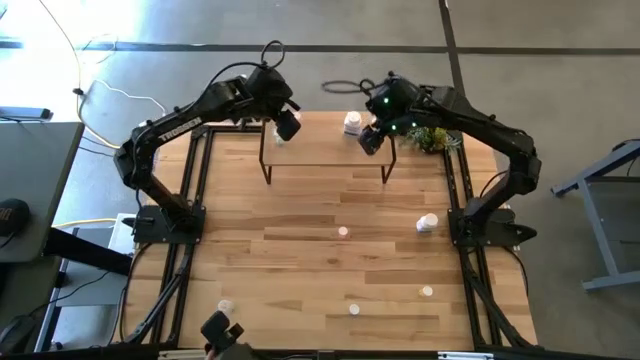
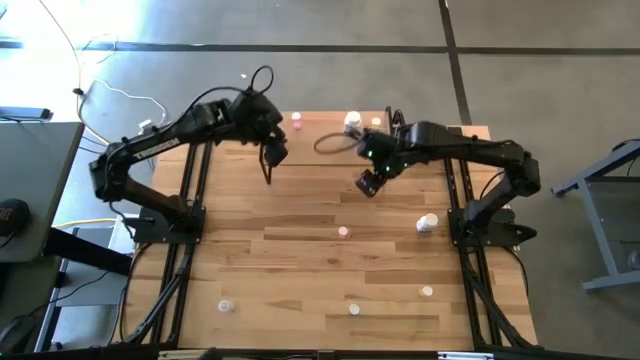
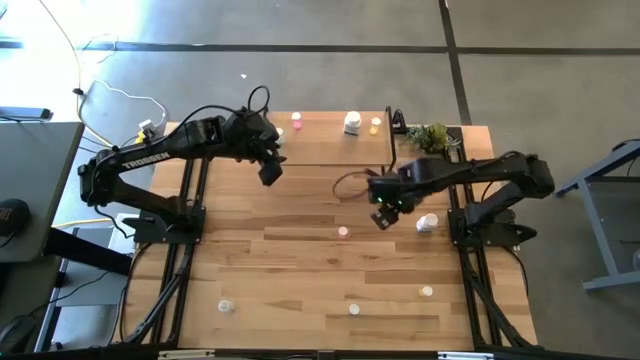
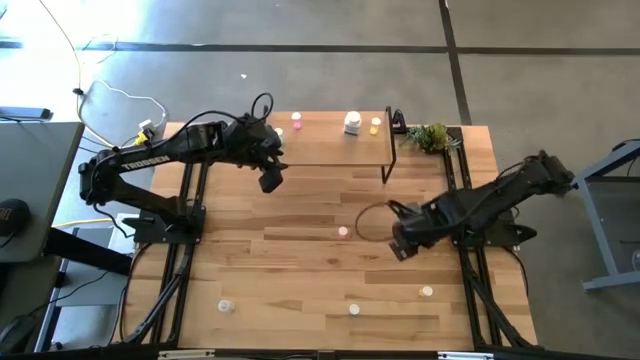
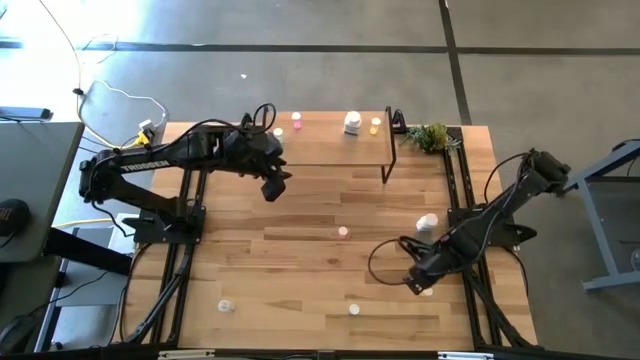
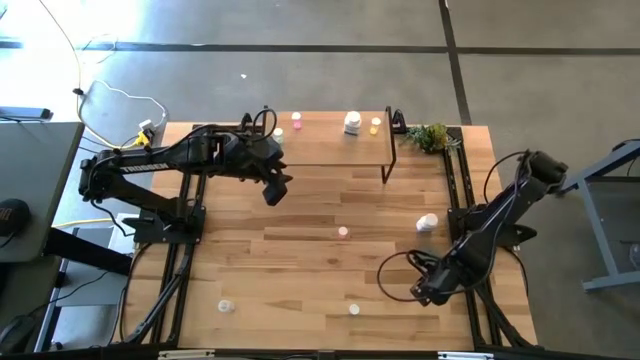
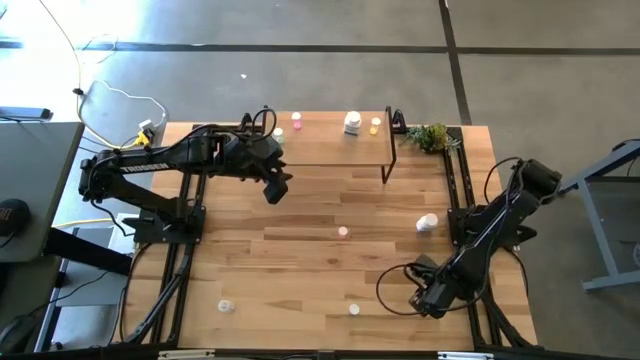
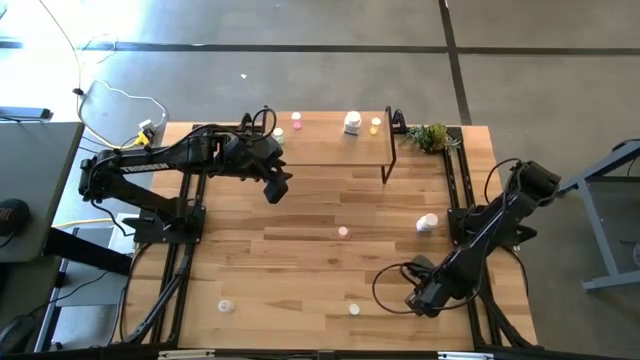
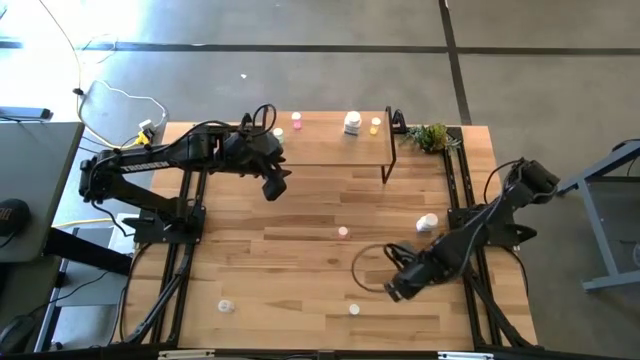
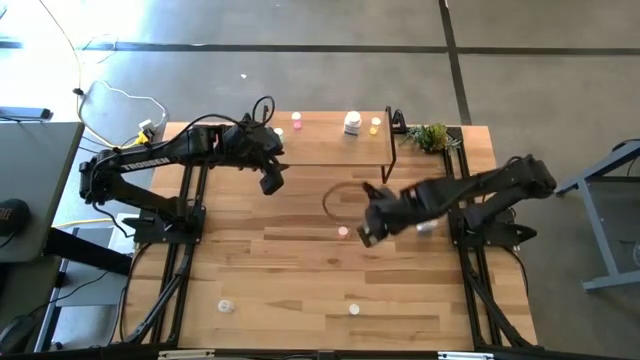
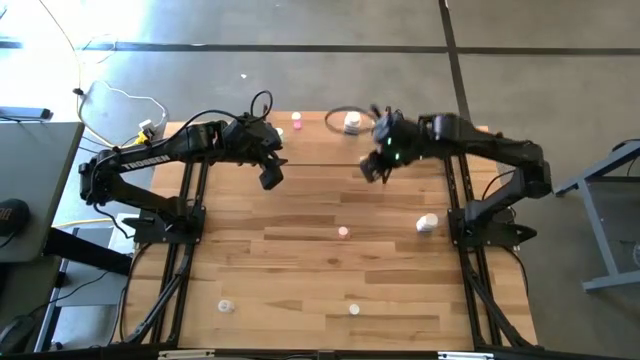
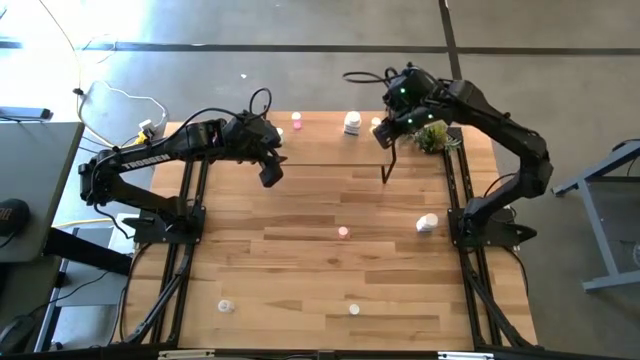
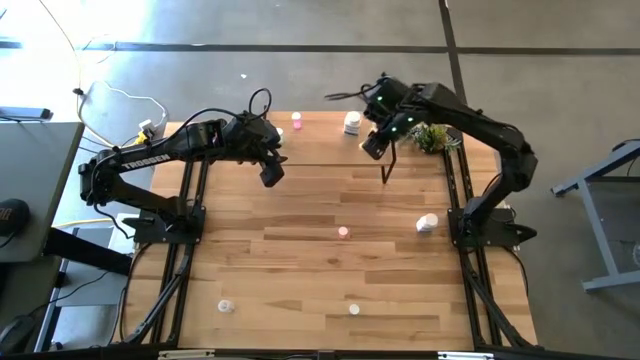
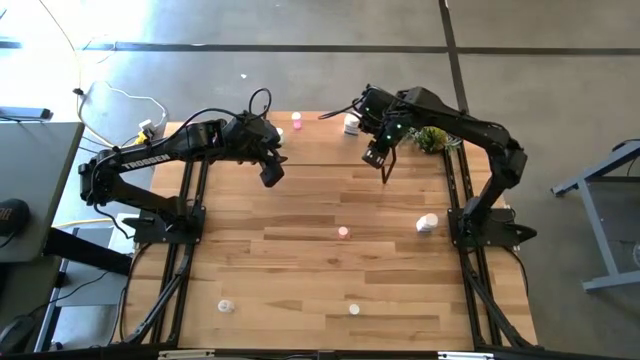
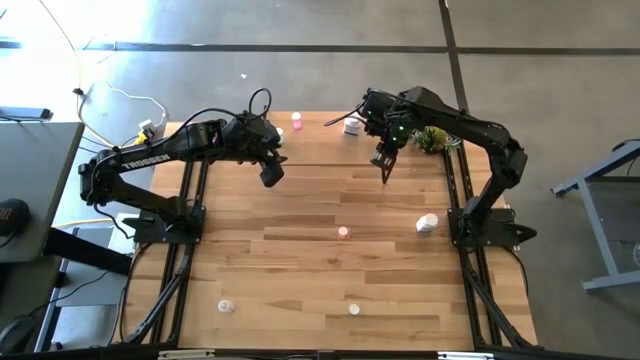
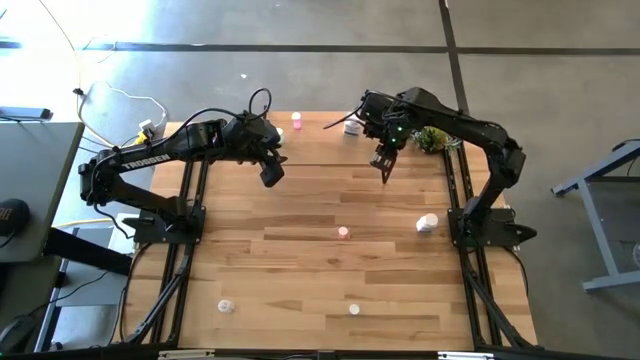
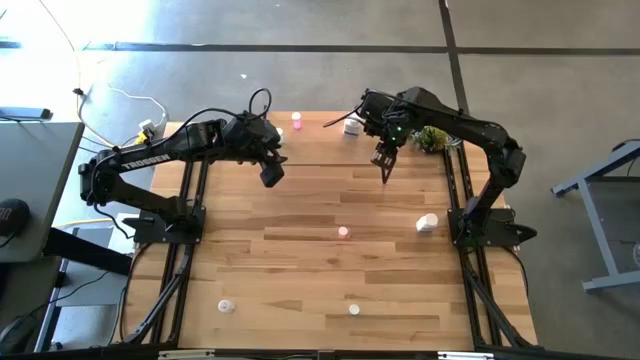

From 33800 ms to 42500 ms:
Task: Pick and place medicine bottles onto shelf by color
Put the yellow pill bottle on the shelf aligned with the other yellow pill bottle

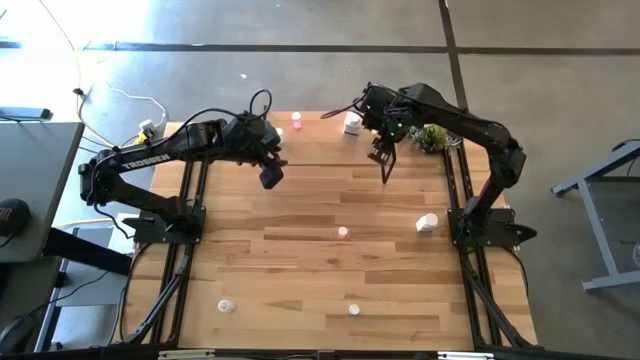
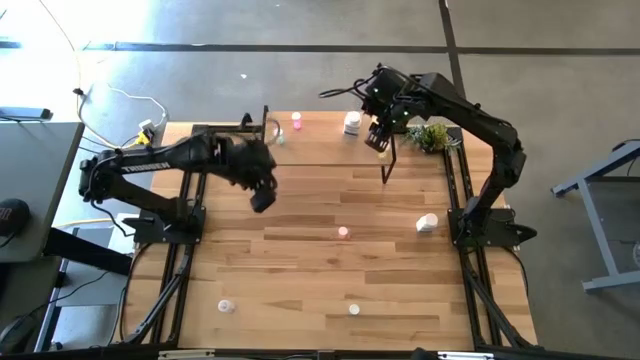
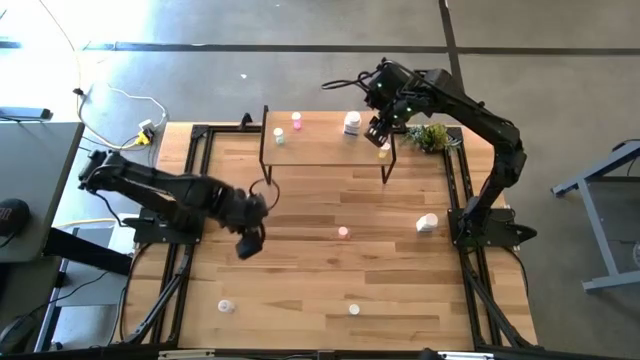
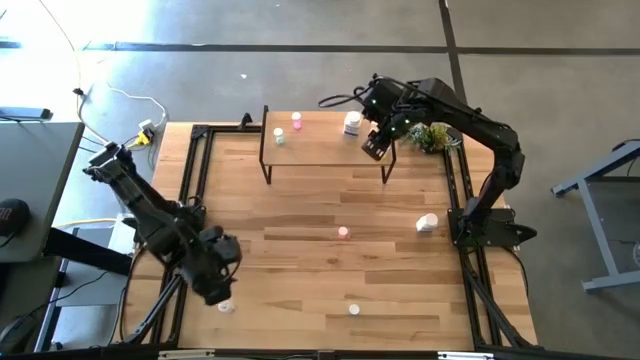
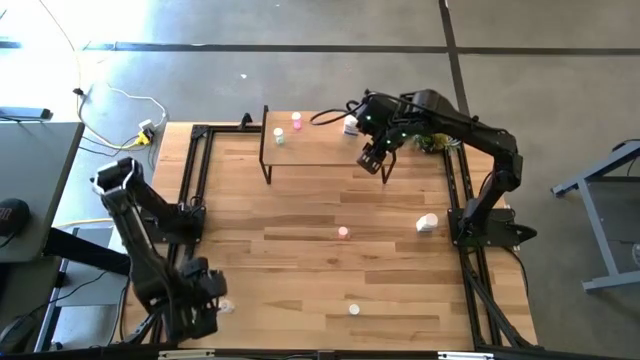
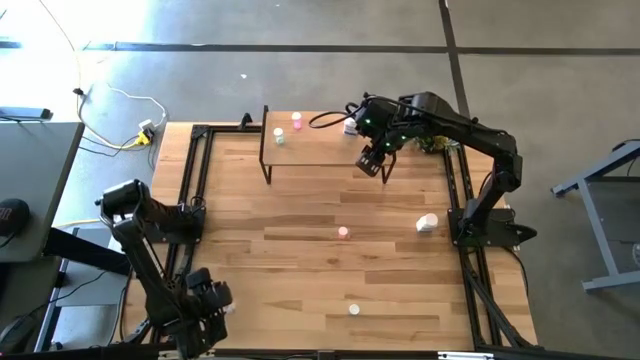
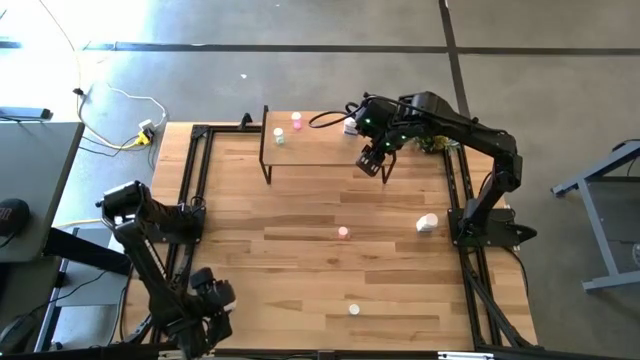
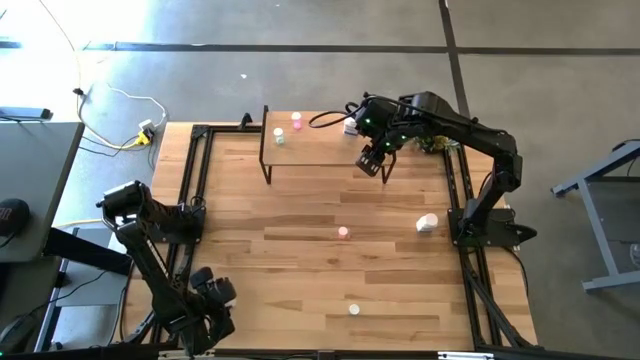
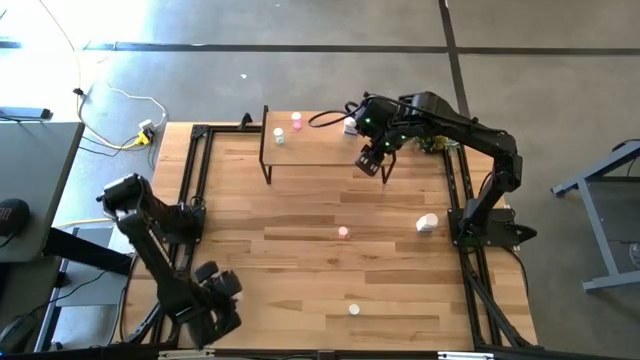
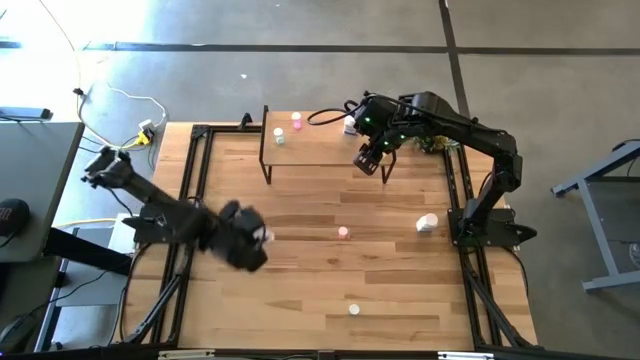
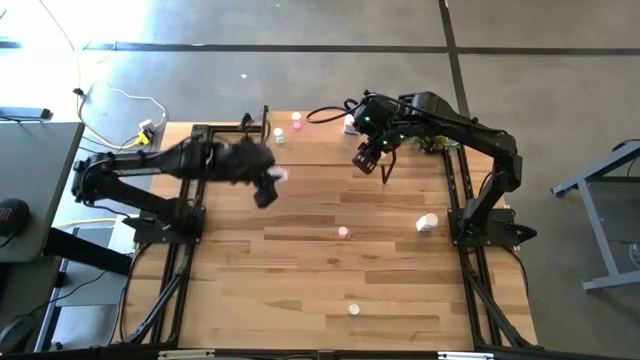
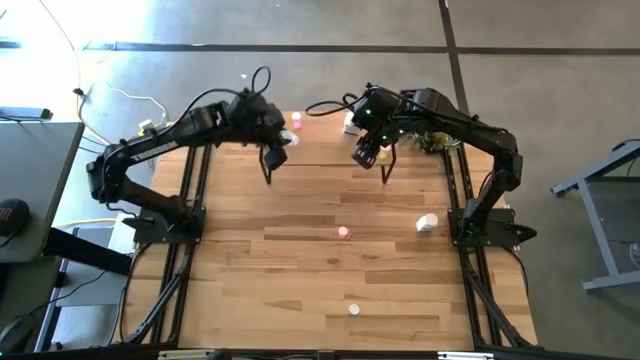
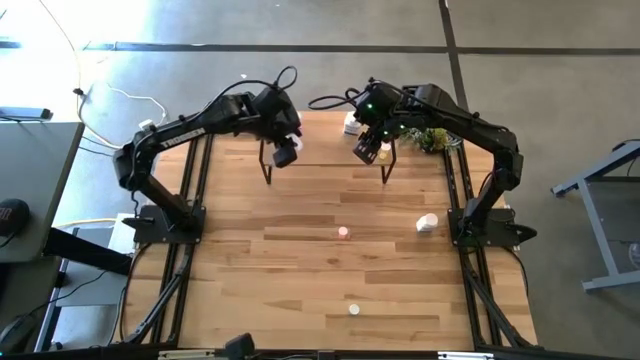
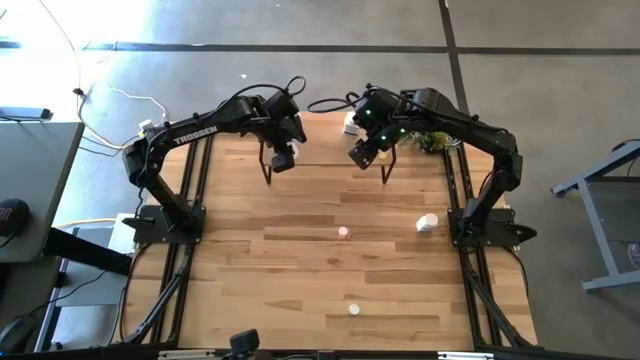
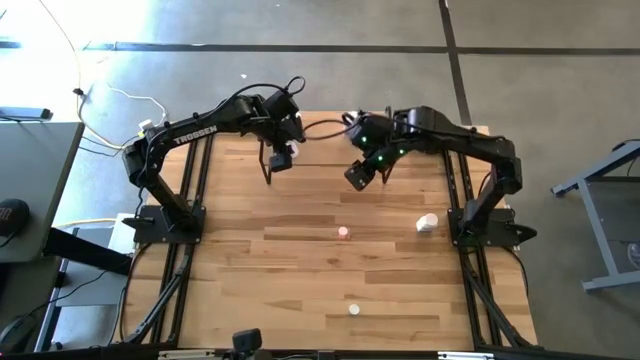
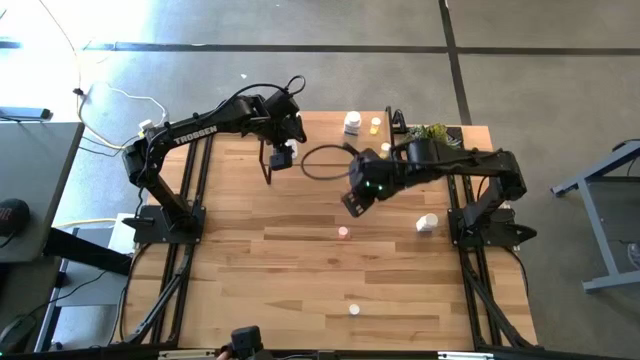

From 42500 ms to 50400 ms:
Put the transparent pill bottle on the shelf

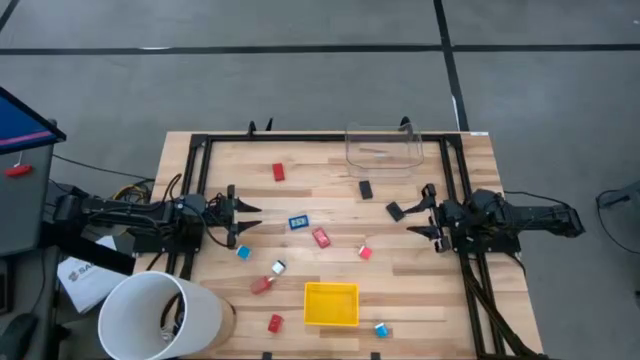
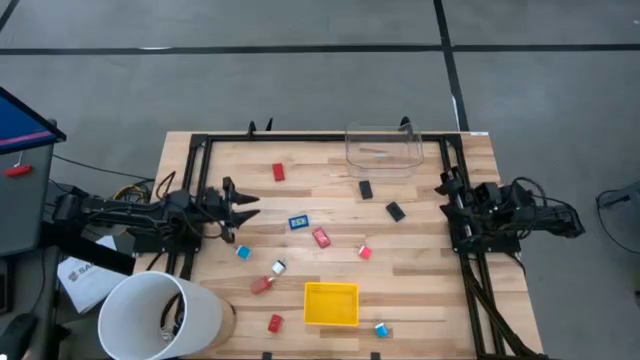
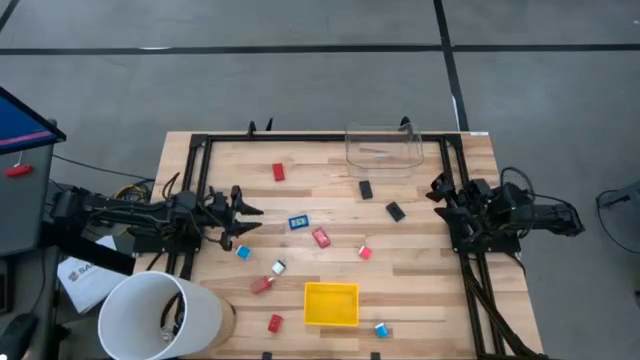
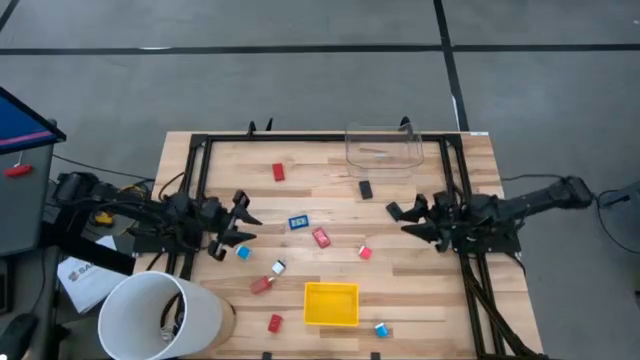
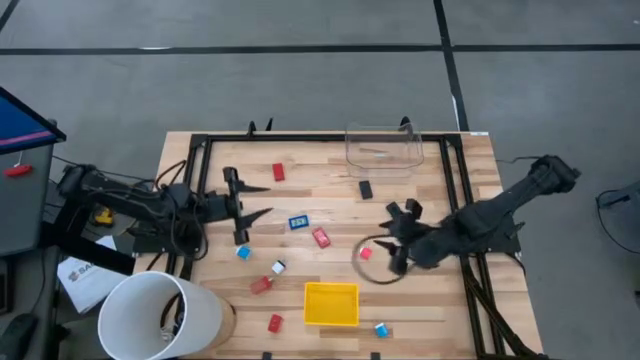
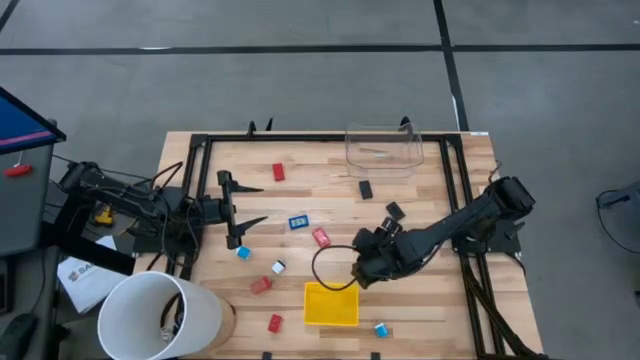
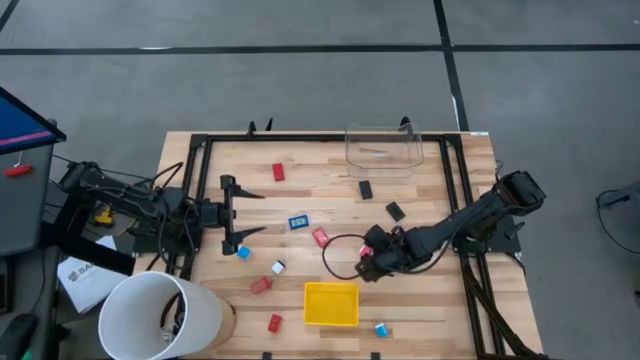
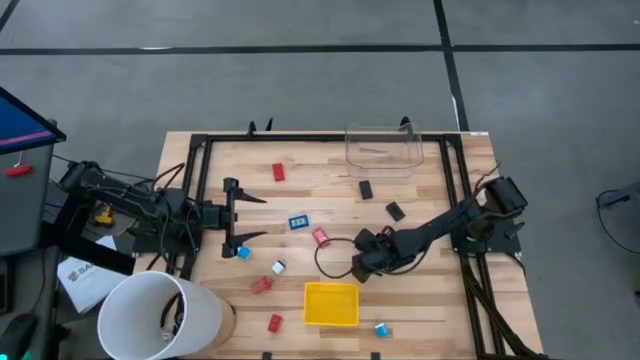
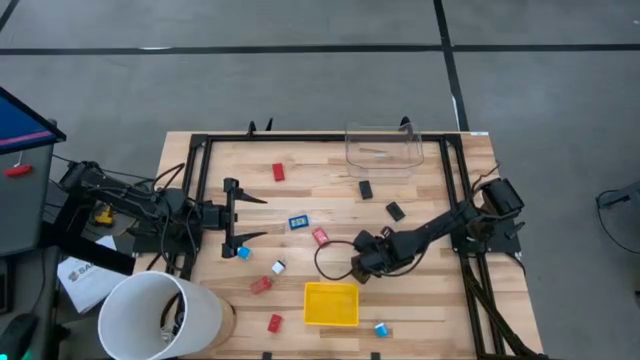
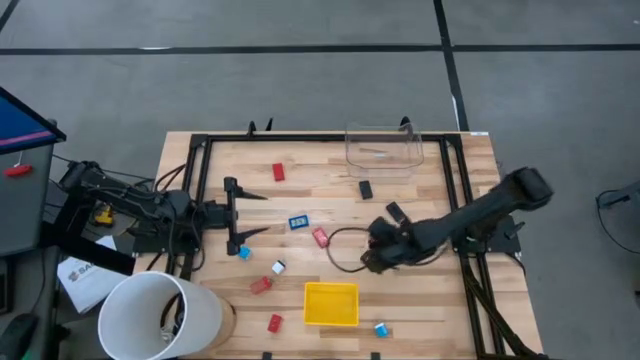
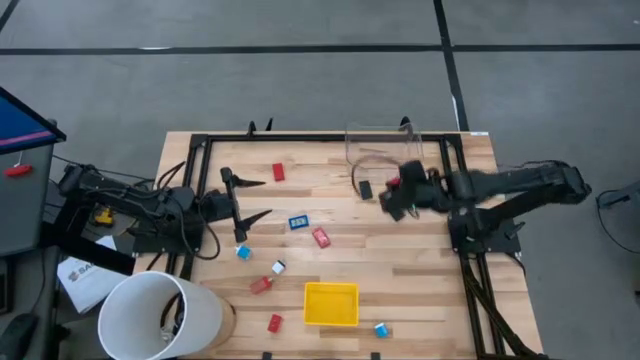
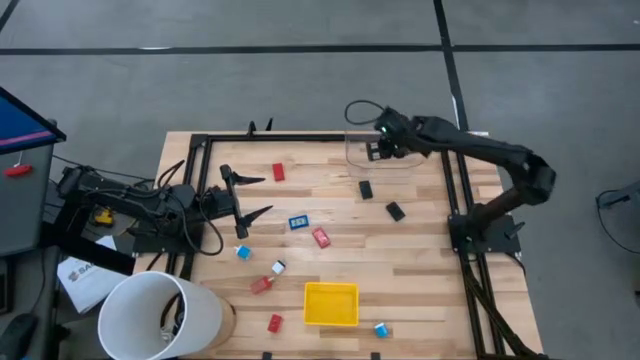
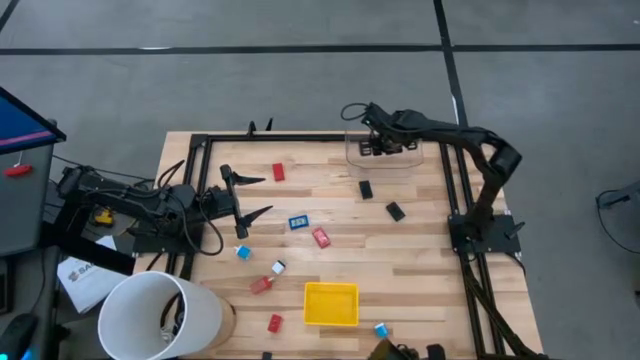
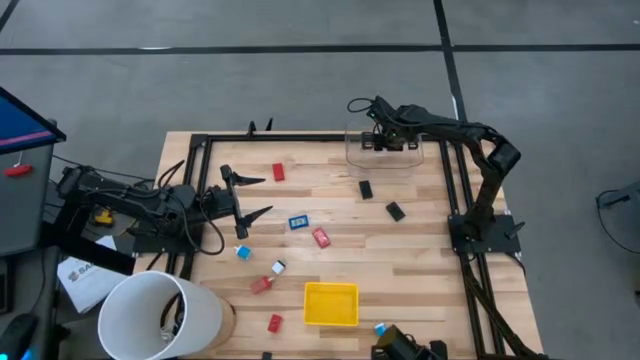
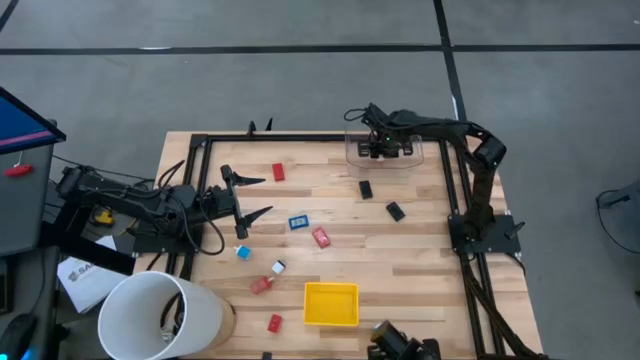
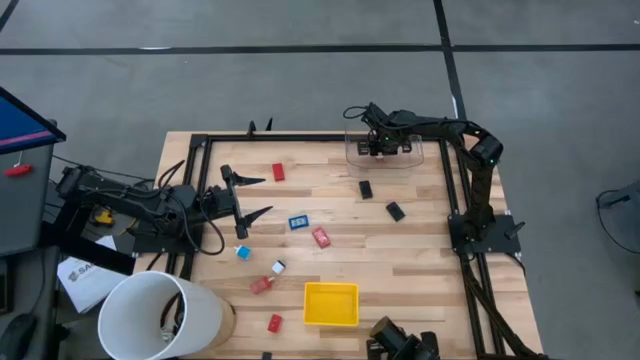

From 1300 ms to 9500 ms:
Task: Pick & Place Office items
Put the pink charger adapter into the transparent bin
